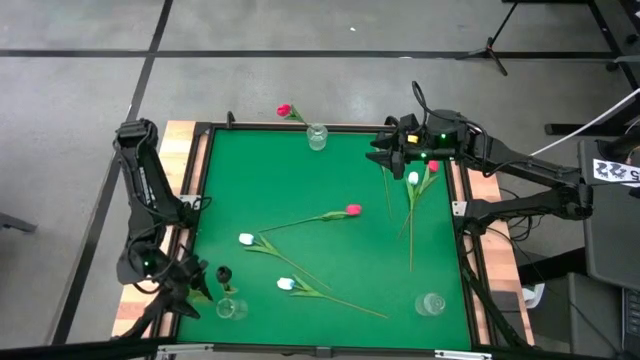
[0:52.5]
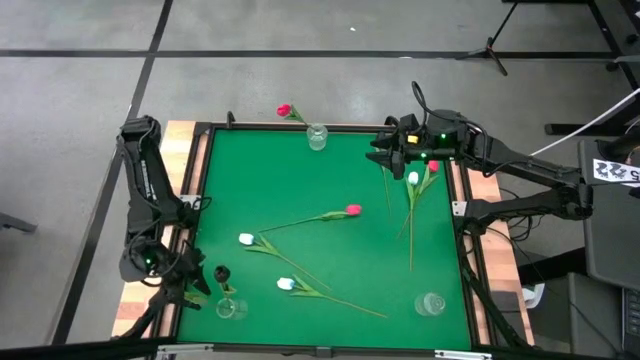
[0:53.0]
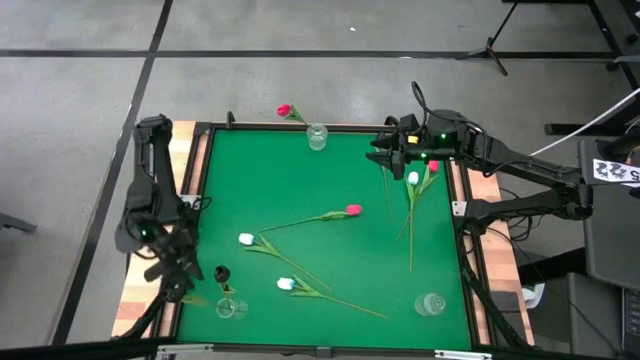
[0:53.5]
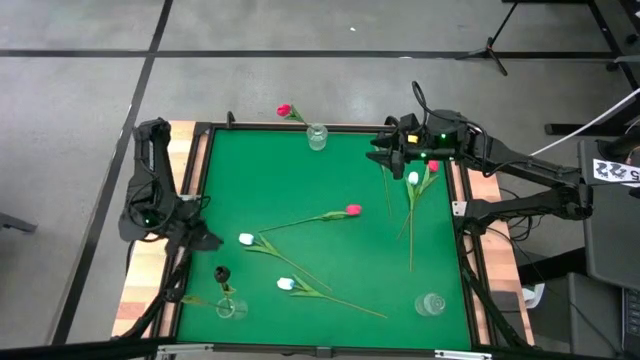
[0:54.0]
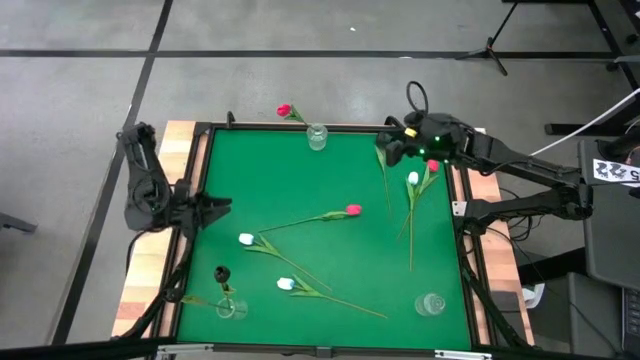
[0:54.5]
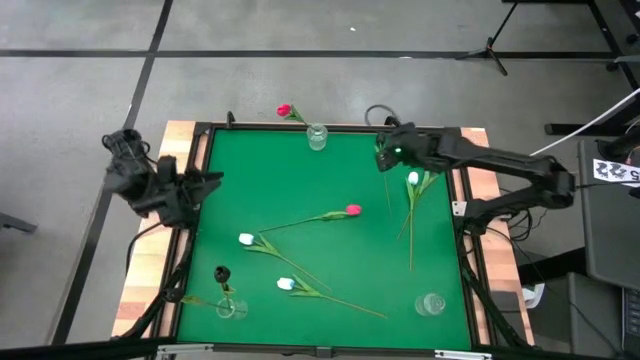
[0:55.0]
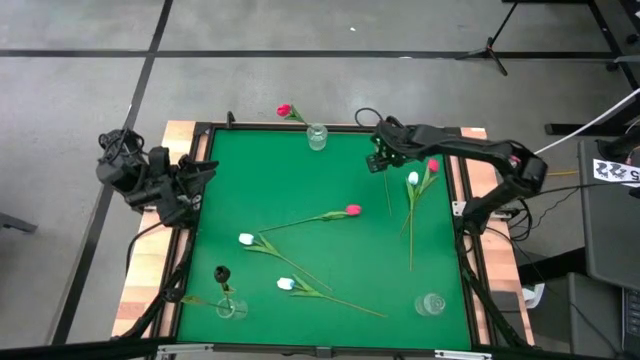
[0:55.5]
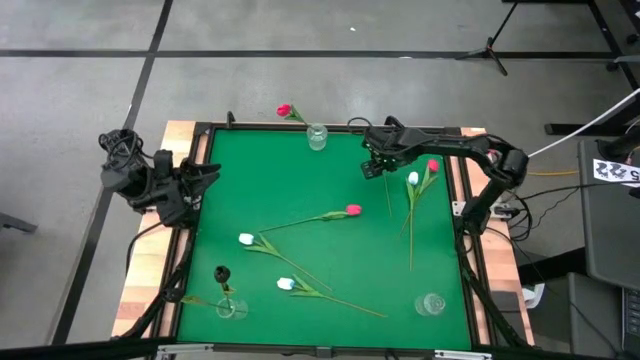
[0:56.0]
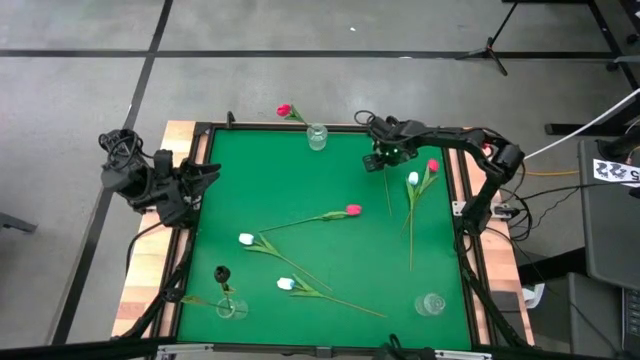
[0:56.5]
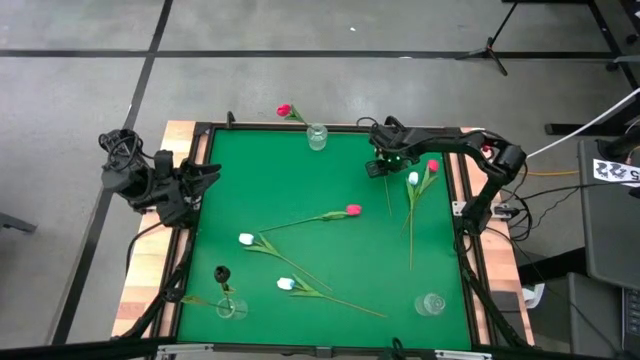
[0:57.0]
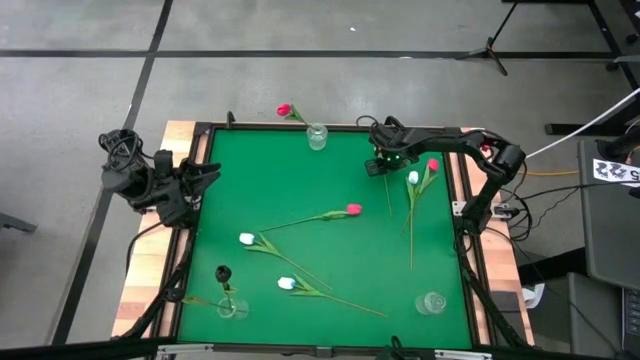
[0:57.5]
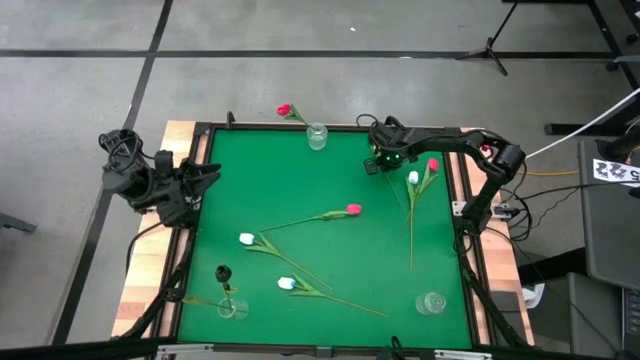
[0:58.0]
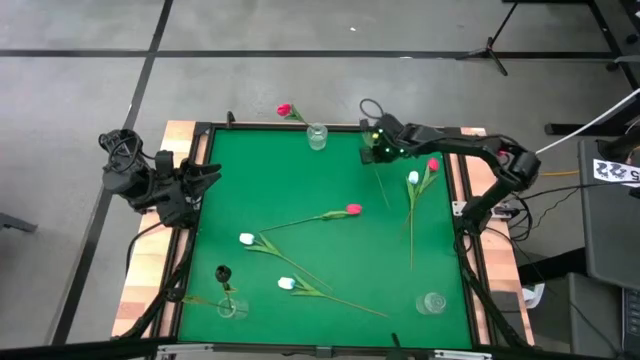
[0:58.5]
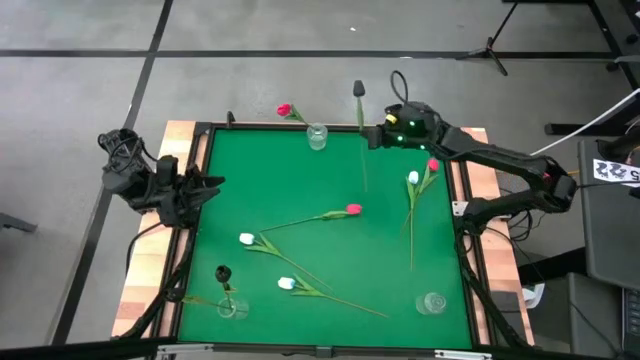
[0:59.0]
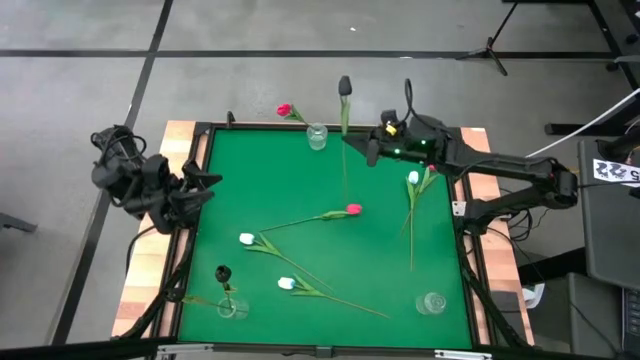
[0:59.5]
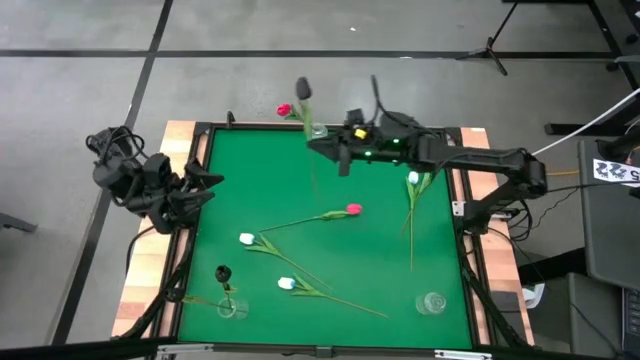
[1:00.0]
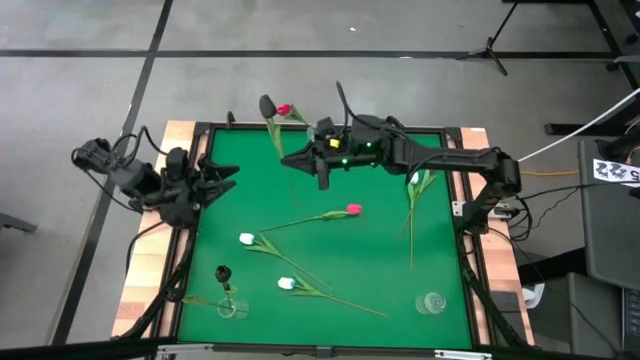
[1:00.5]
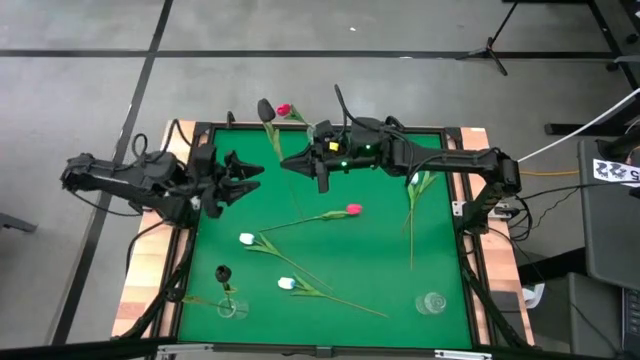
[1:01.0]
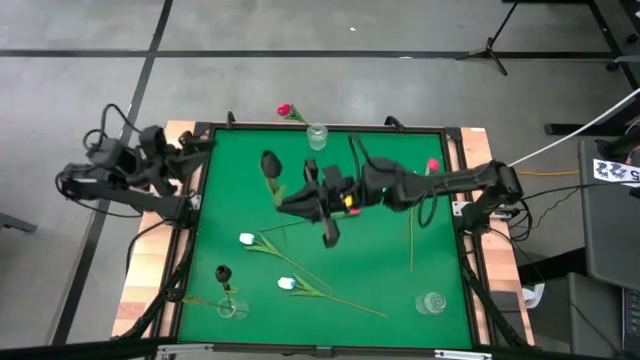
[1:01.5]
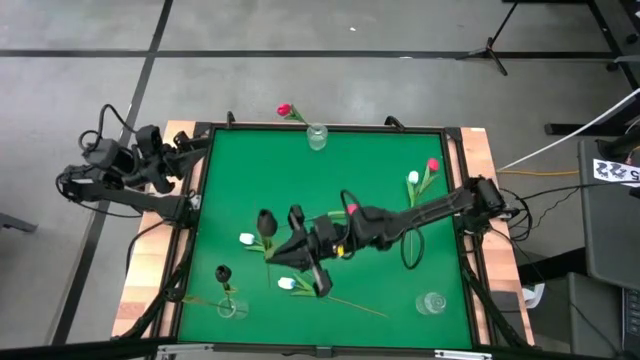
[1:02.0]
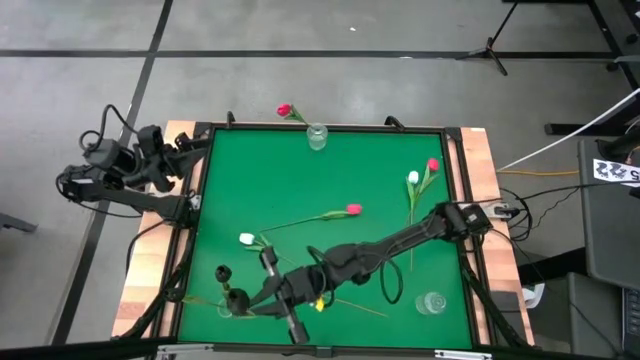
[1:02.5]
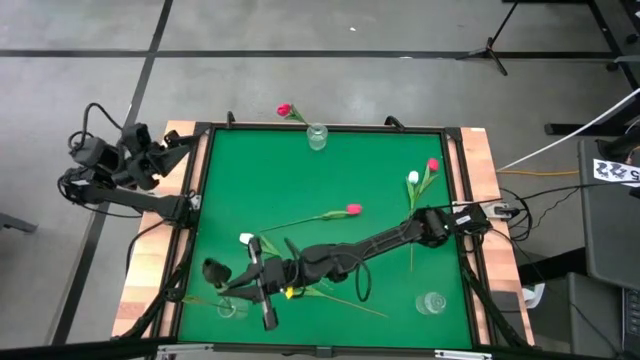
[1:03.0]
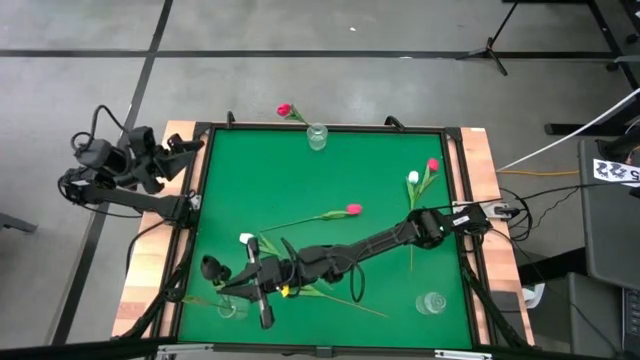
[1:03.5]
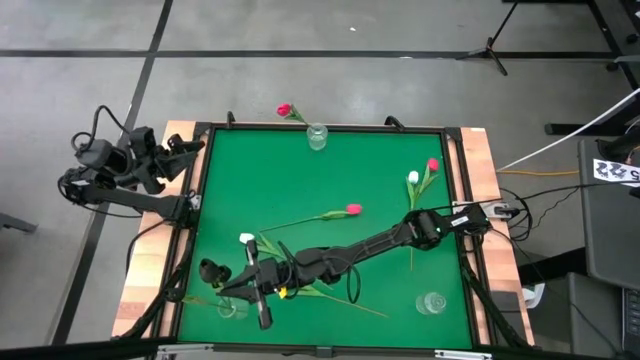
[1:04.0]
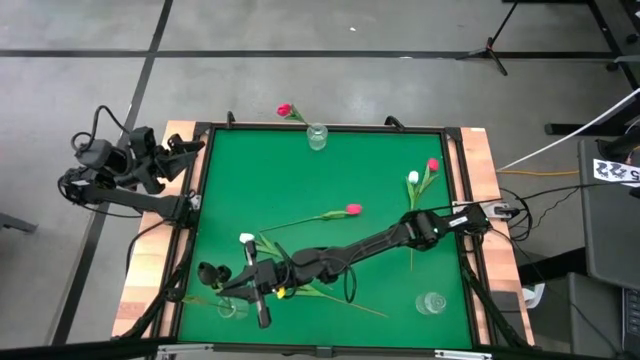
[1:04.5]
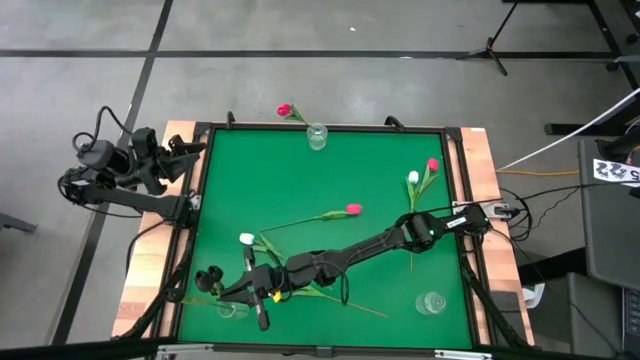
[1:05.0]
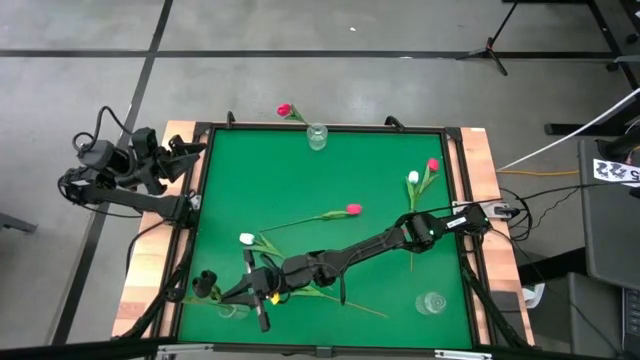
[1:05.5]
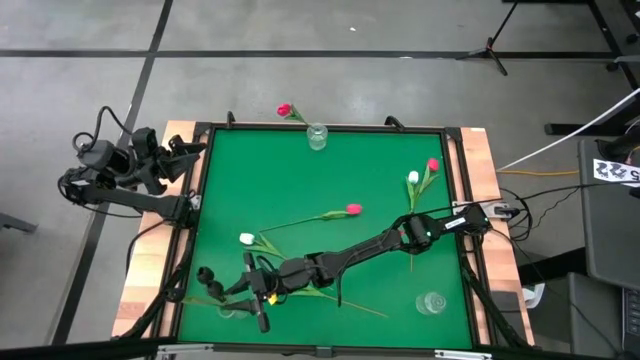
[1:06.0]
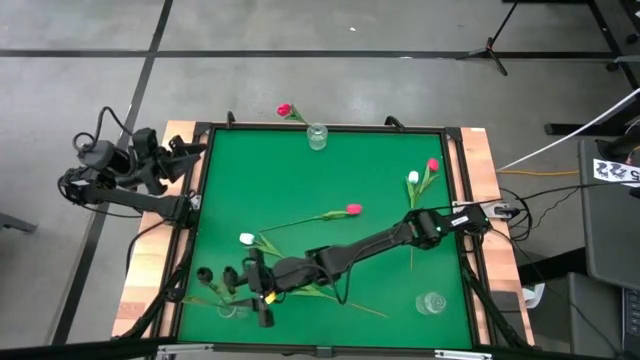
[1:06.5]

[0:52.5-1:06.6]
Task: Sort flowers into vase by color
Put the black flower into the bottom left transparent vase

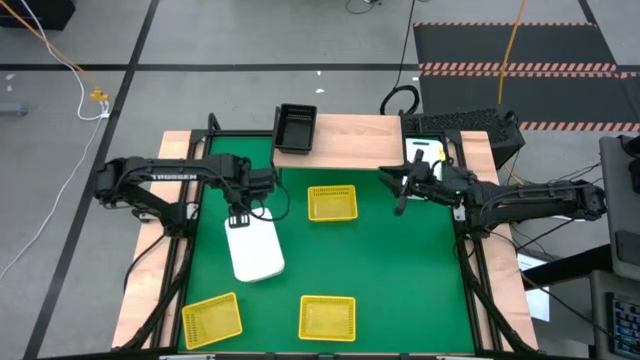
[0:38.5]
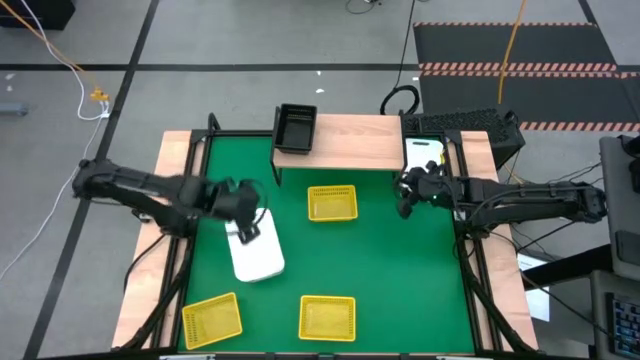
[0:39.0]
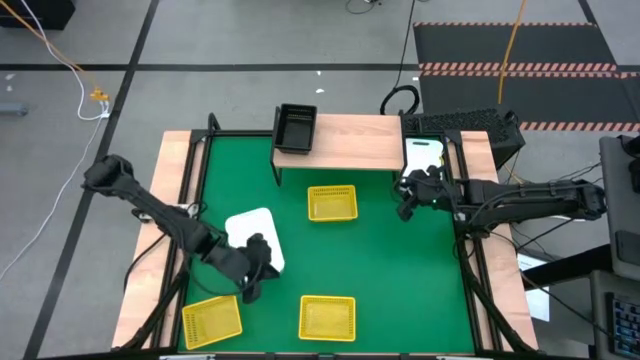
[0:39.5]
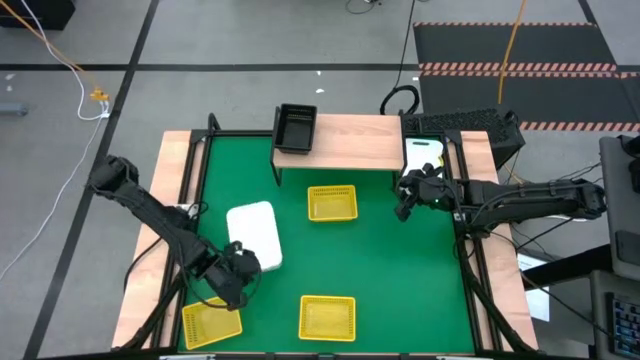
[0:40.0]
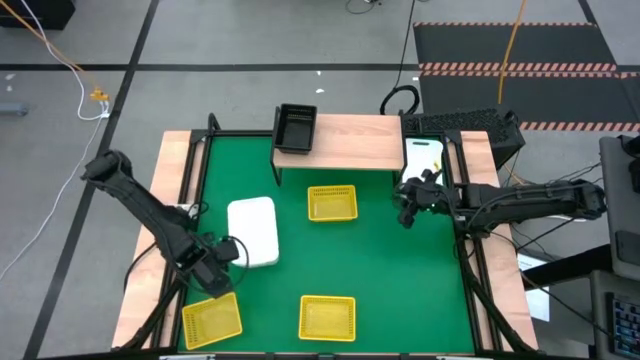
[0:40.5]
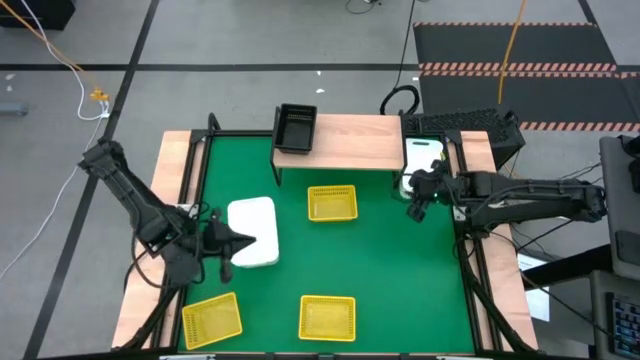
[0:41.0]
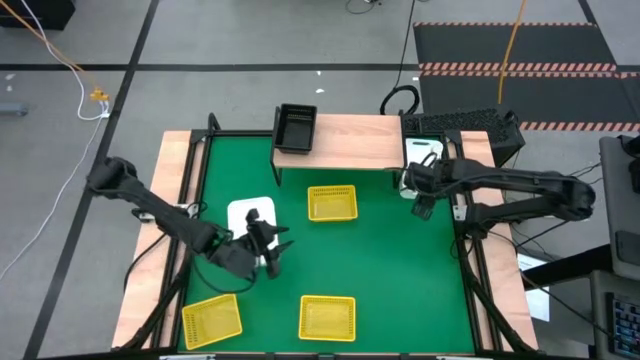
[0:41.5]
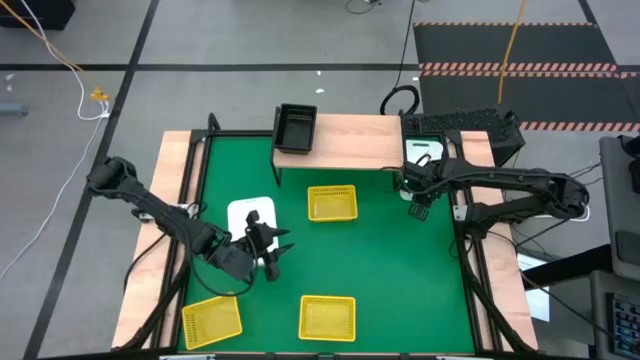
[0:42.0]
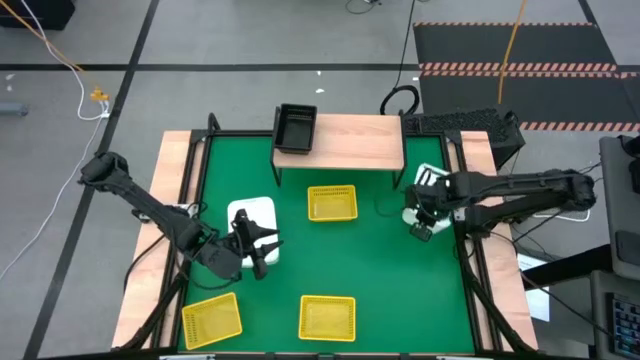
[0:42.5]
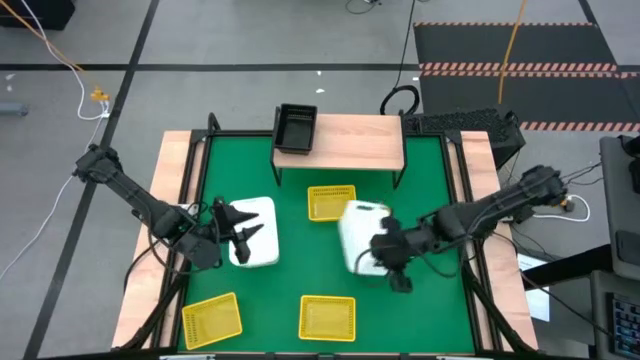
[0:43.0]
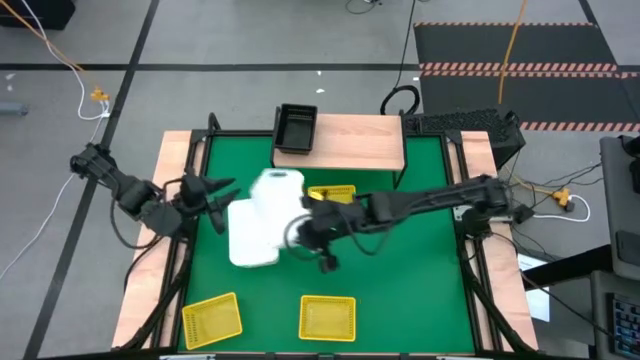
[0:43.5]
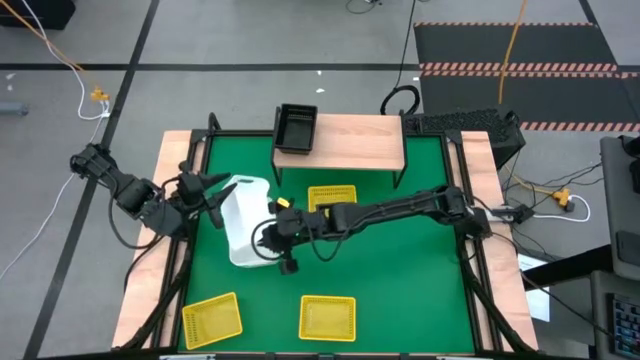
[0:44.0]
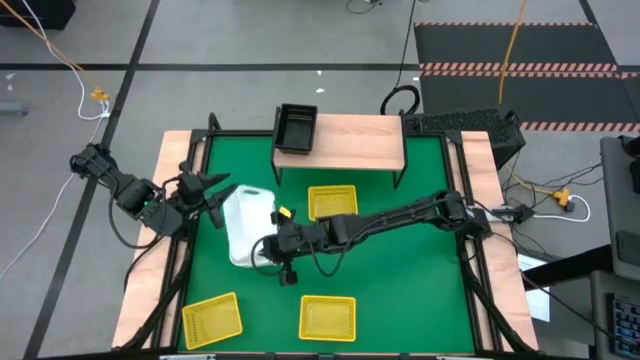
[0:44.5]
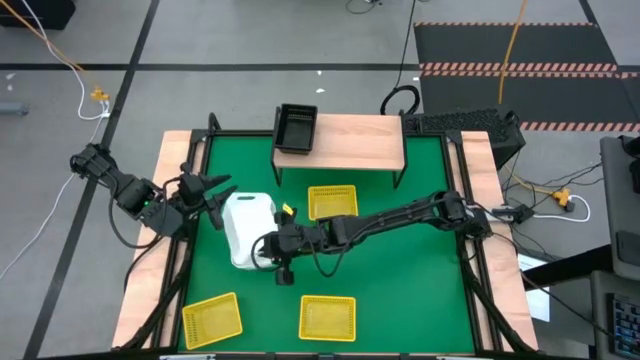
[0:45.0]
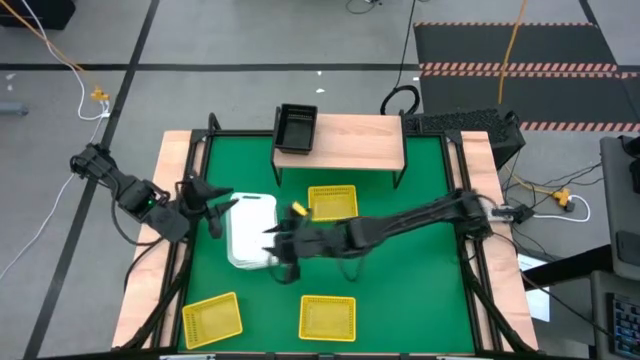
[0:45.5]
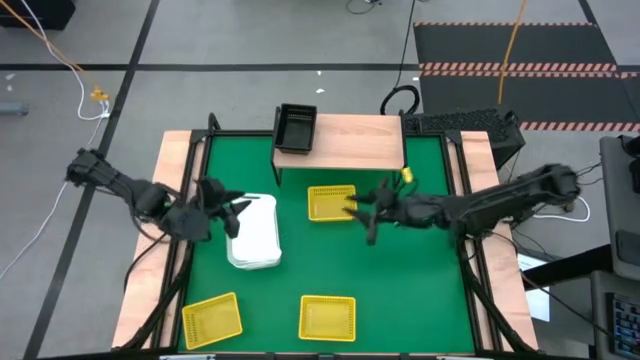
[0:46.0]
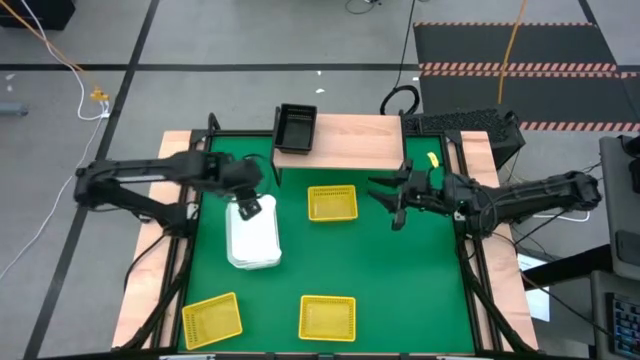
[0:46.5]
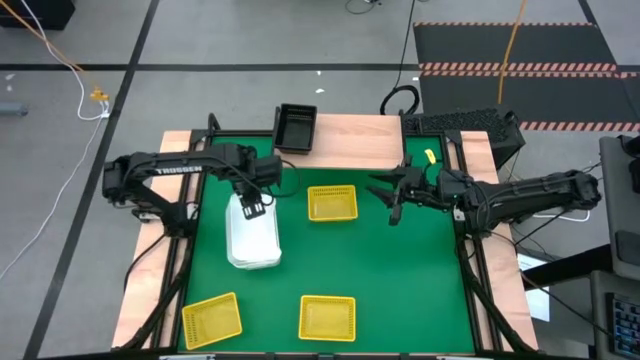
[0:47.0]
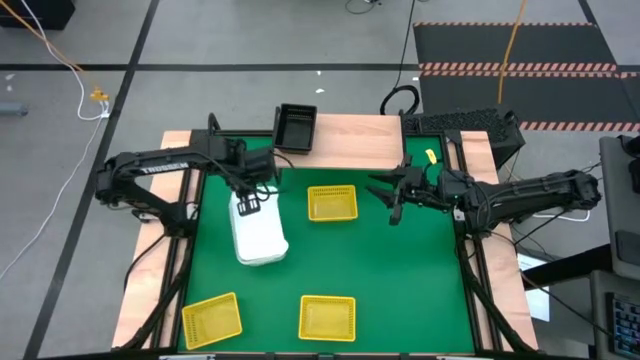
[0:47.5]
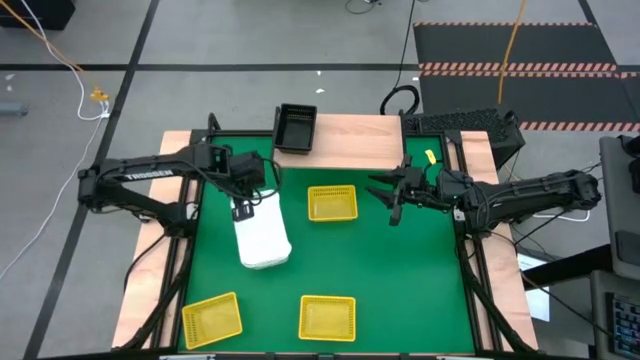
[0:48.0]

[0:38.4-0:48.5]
Task: Stack baskets on shelf by color
Stack the top white bin on top of the bottom white bin
